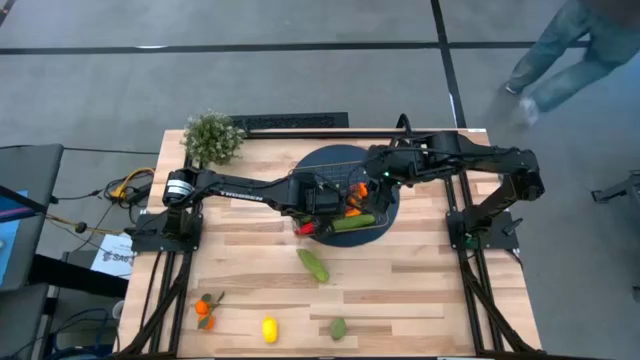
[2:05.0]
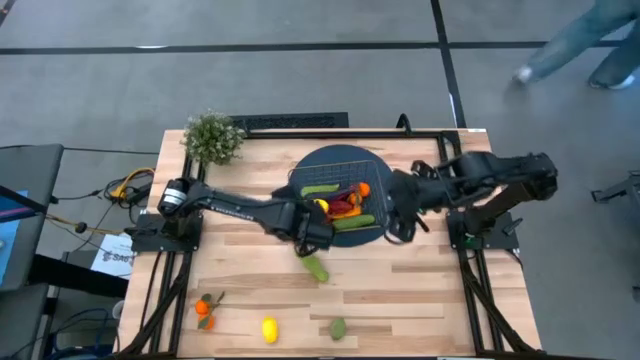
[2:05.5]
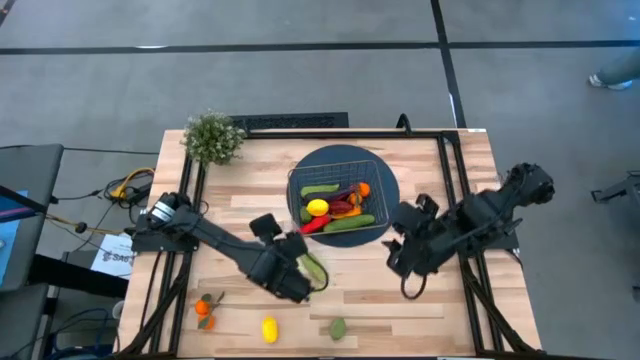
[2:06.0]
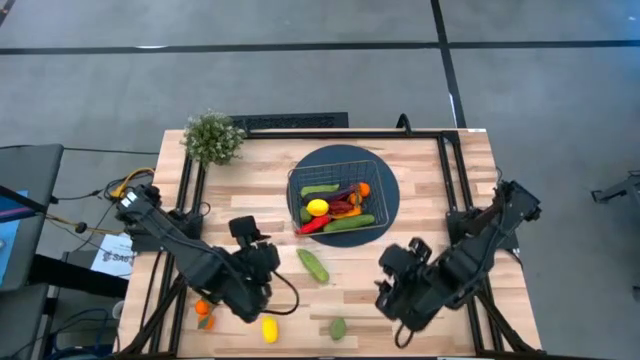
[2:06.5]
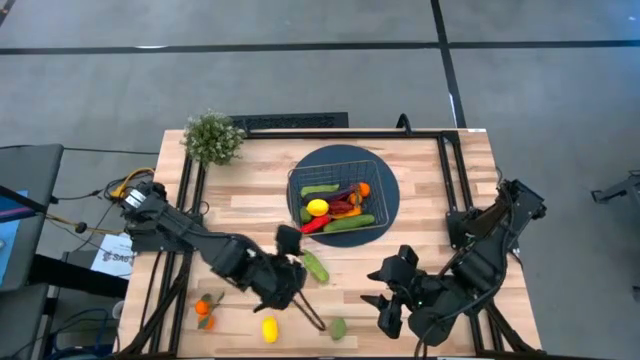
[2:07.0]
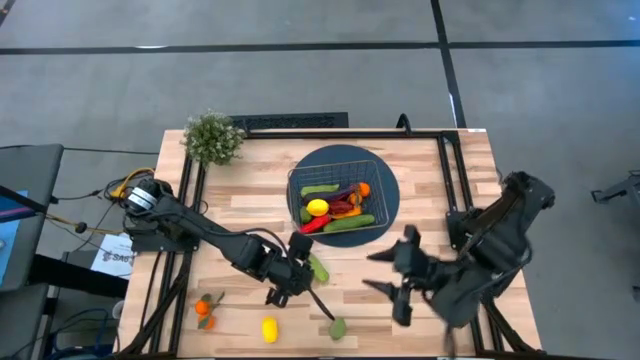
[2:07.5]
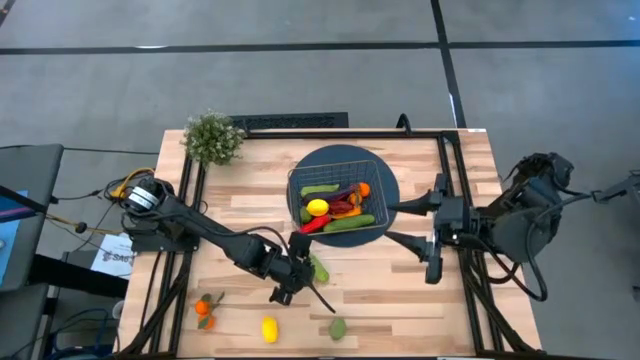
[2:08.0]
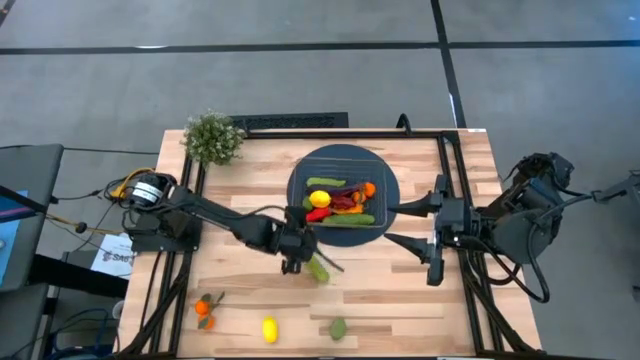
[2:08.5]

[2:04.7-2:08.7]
Task: Build produce basket
Adjust the wire basket

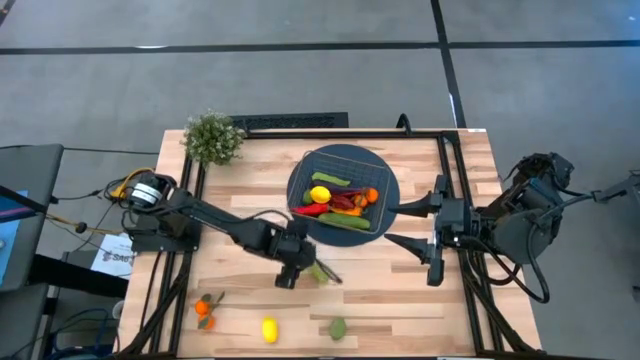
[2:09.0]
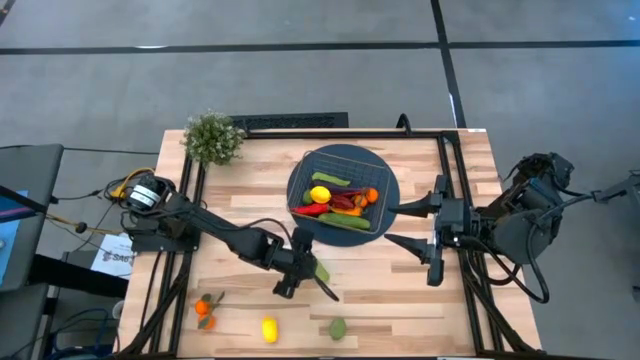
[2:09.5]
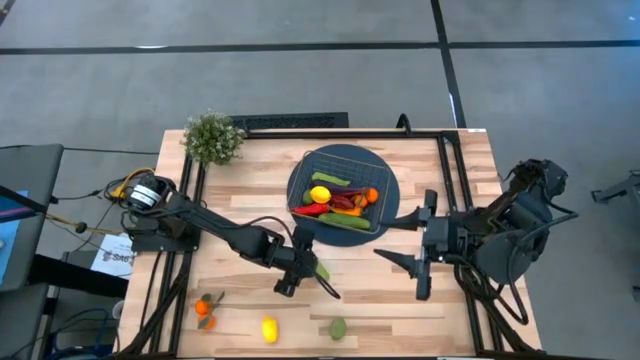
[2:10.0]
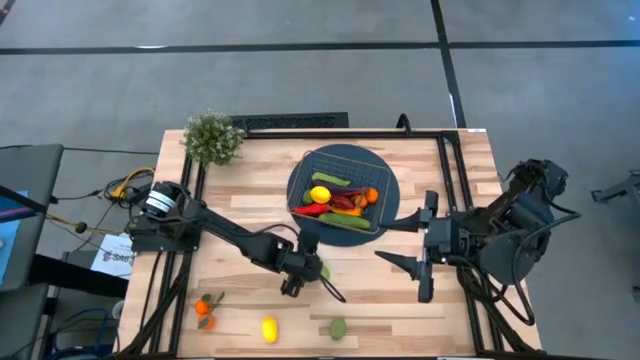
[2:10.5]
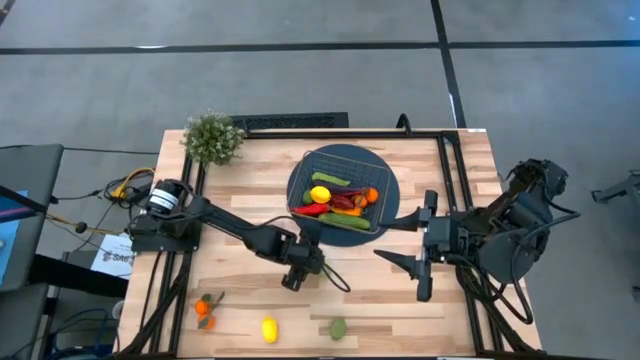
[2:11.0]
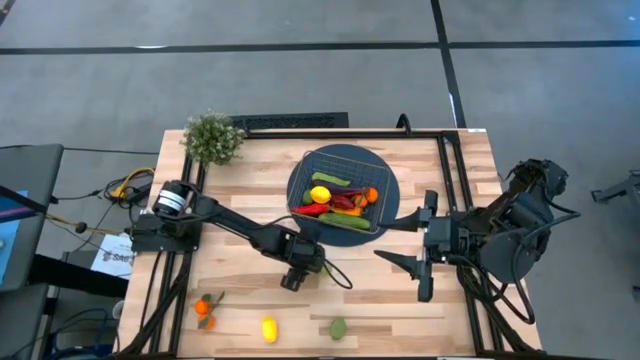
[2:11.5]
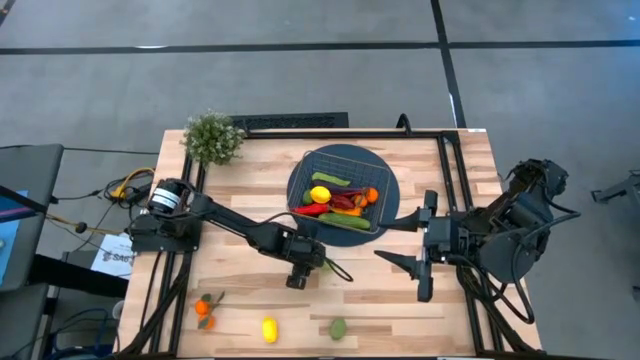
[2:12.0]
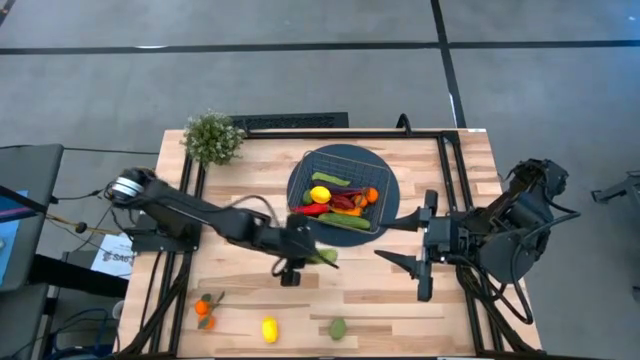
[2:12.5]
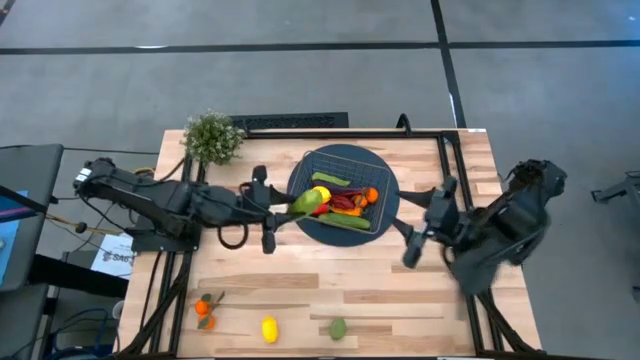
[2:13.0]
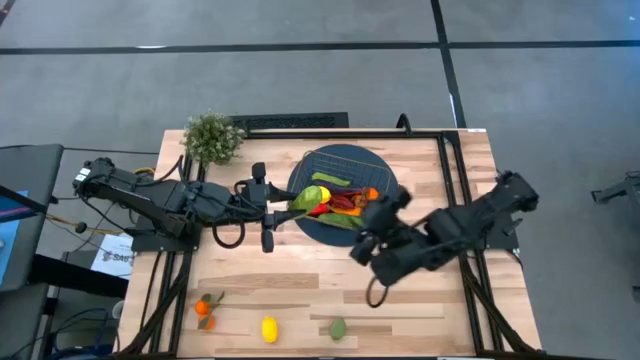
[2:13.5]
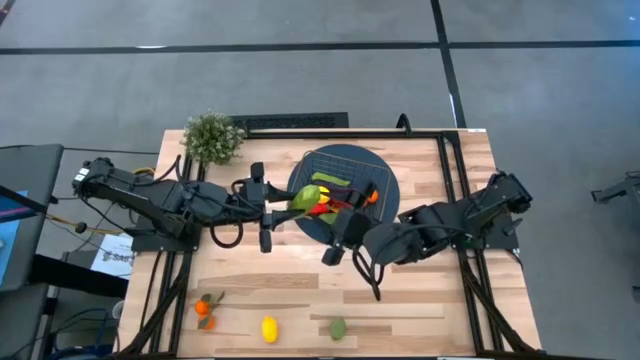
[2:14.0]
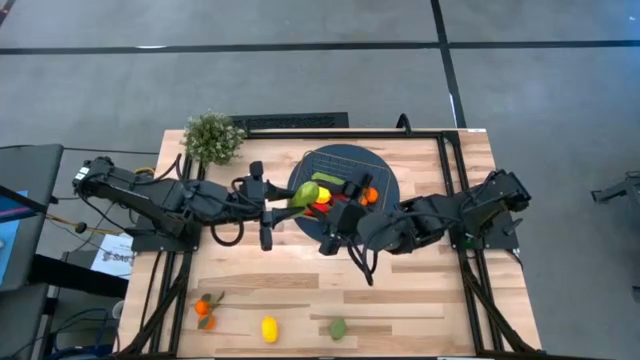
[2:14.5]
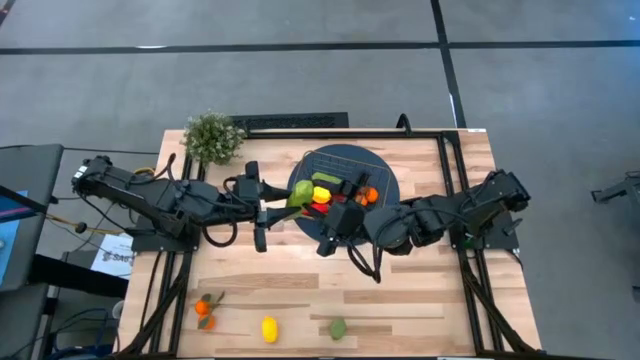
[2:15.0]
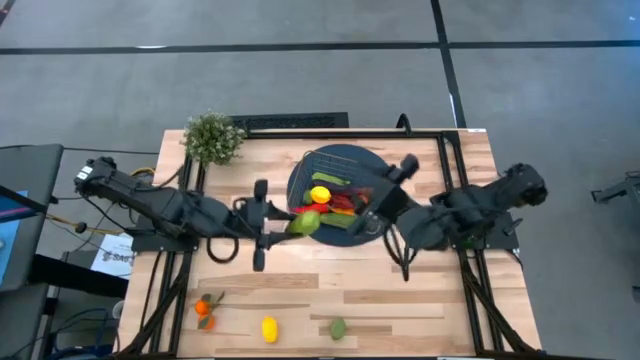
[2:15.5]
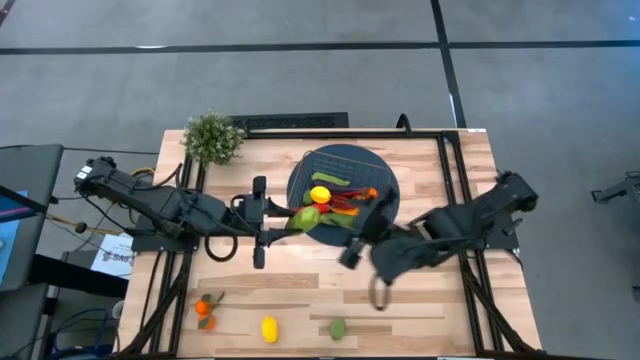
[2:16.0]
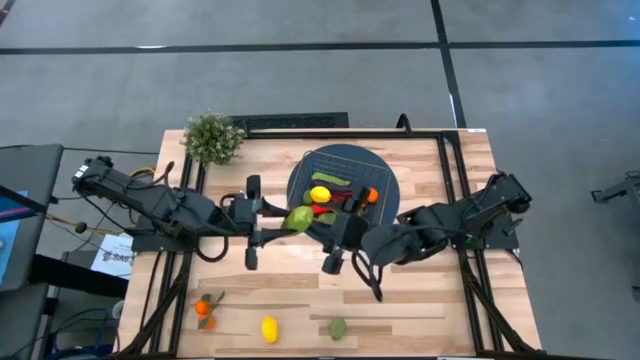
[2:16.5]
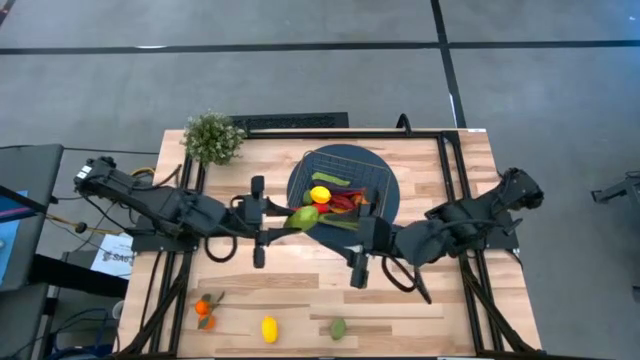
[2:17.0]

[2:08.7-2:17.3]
Put the cucumber into the wire basket

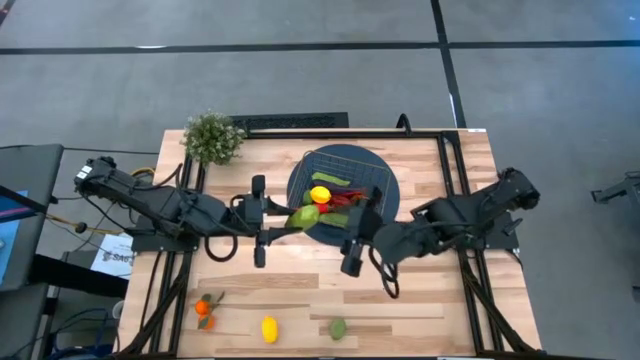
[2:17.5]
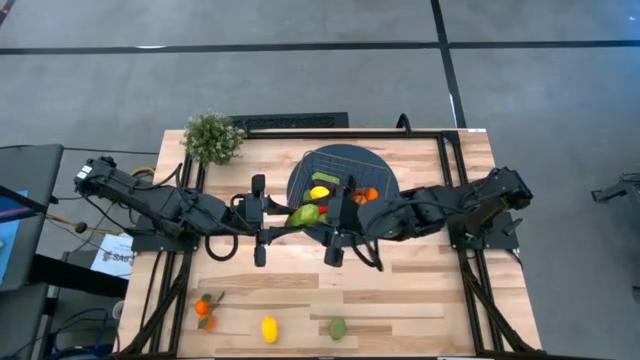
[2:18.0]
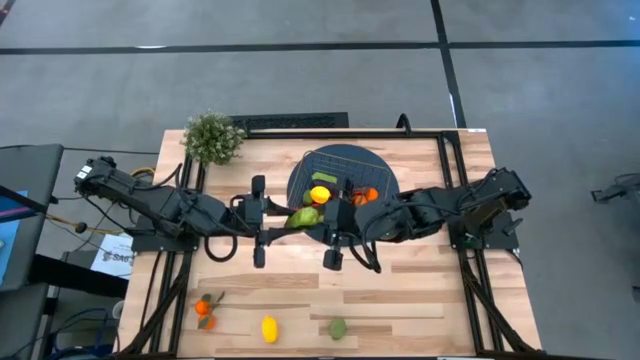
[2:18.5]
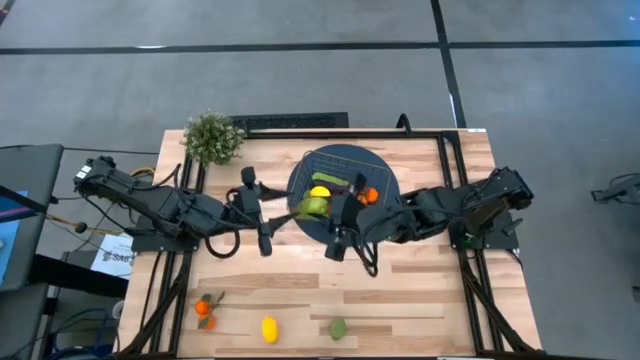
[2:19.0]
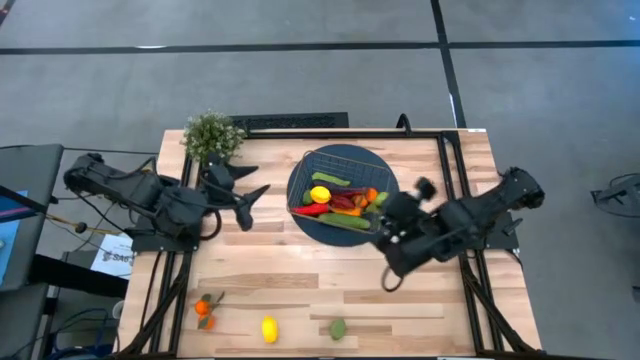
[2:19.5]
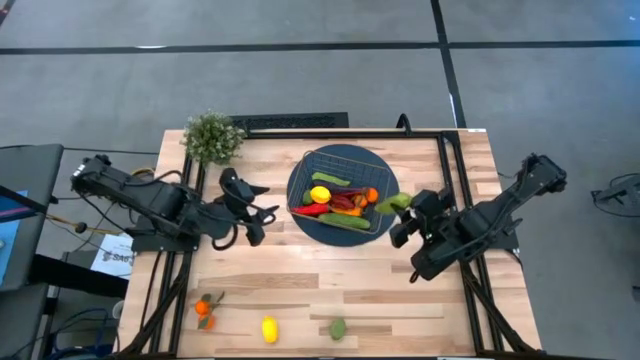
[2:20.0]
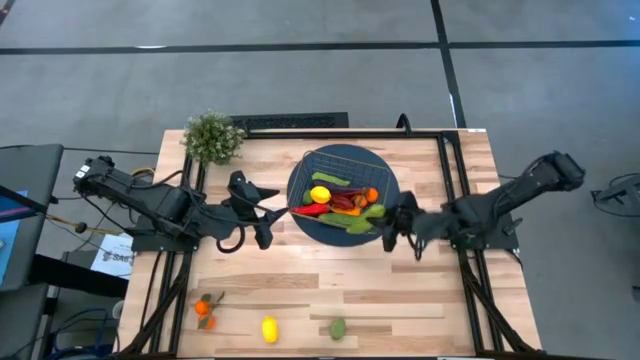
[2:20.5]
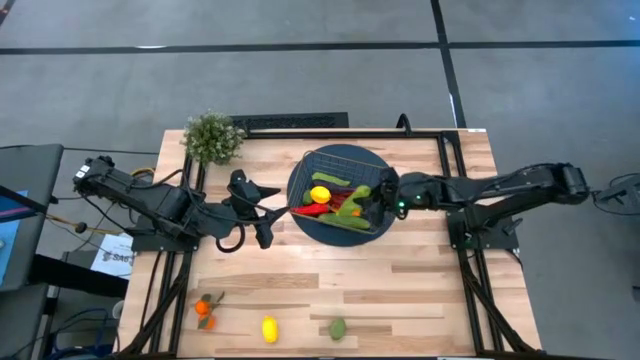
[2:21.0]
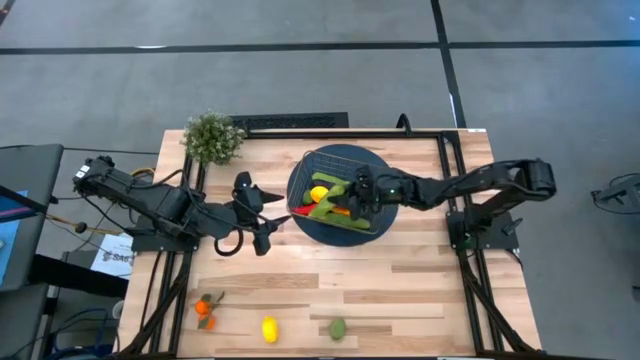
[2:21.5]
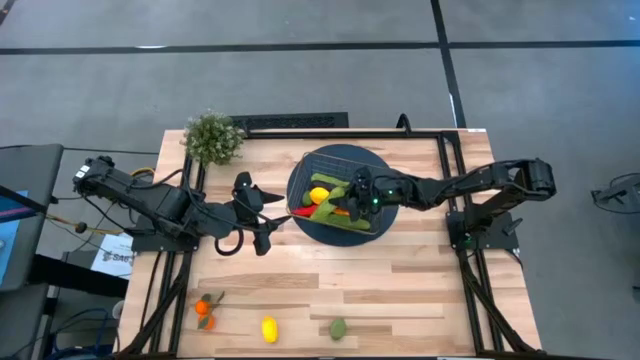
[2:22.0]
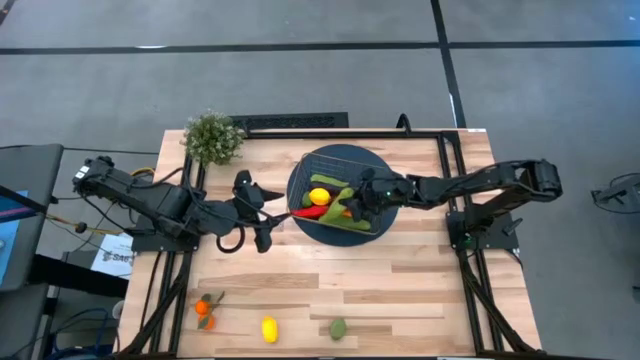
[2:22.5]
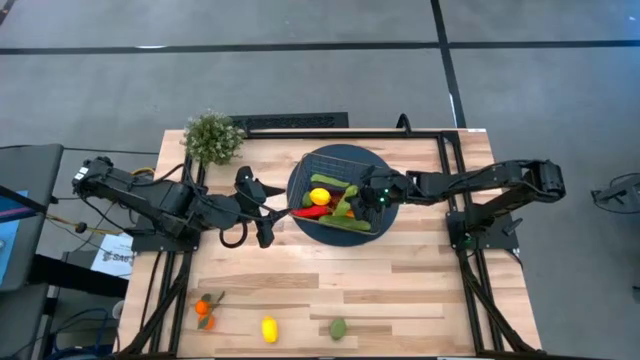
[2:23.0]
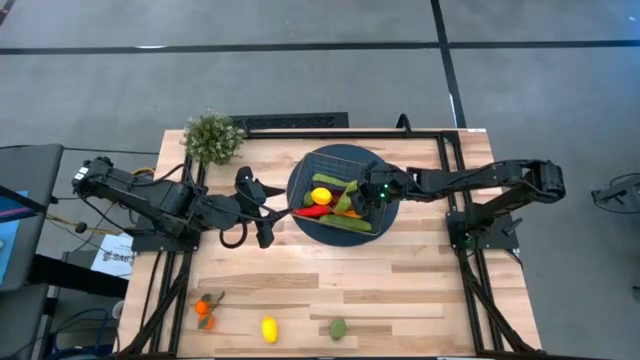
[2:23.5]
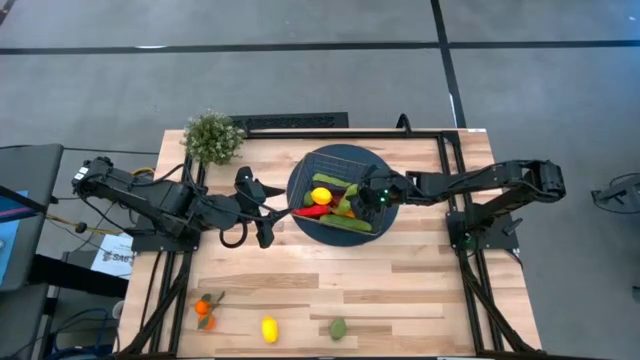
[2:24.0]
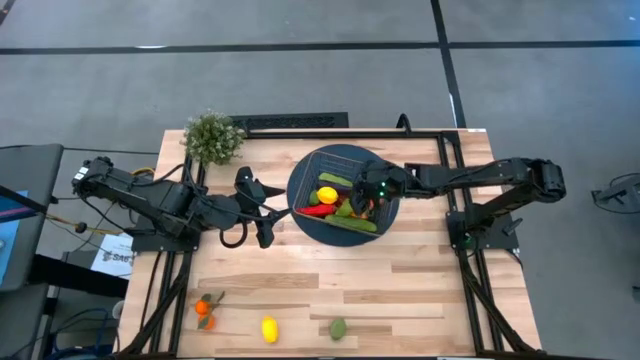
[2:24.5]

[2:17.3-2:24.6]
Put the cucumber into the wire basket

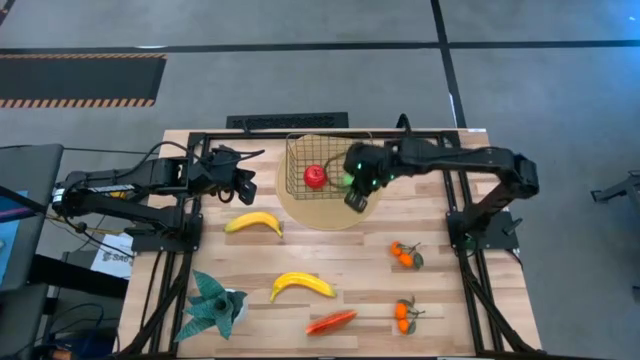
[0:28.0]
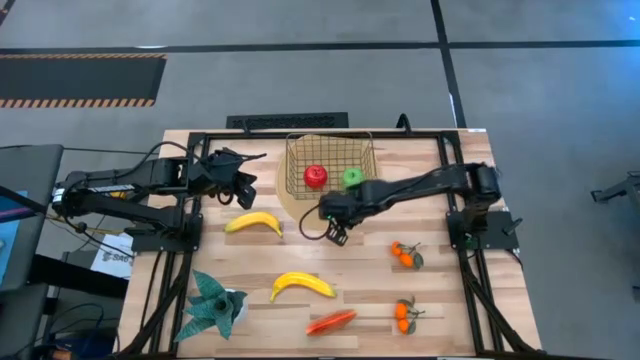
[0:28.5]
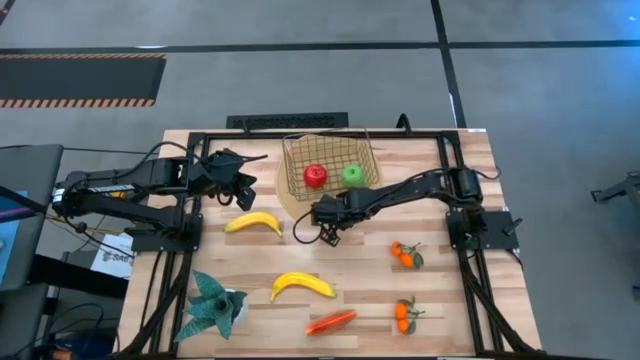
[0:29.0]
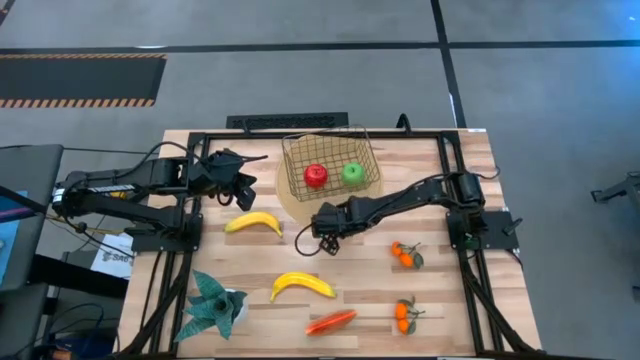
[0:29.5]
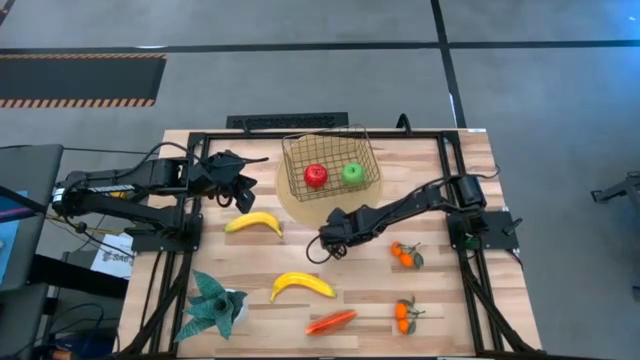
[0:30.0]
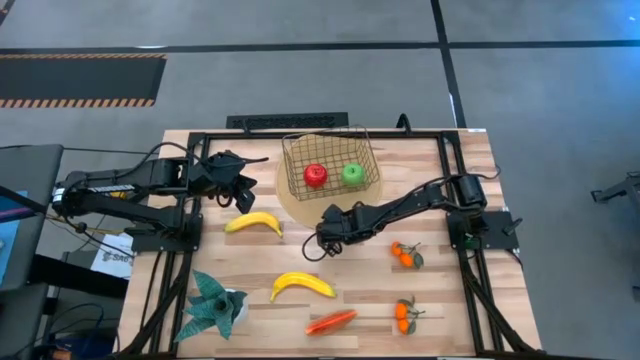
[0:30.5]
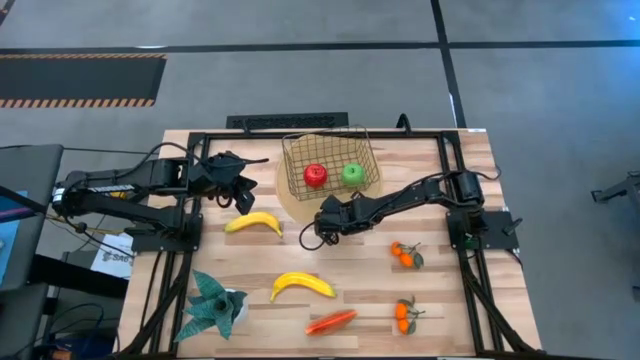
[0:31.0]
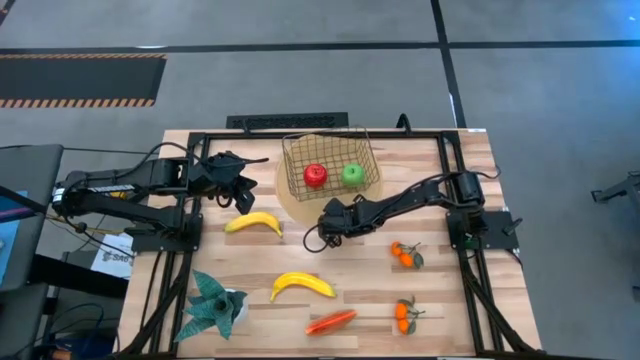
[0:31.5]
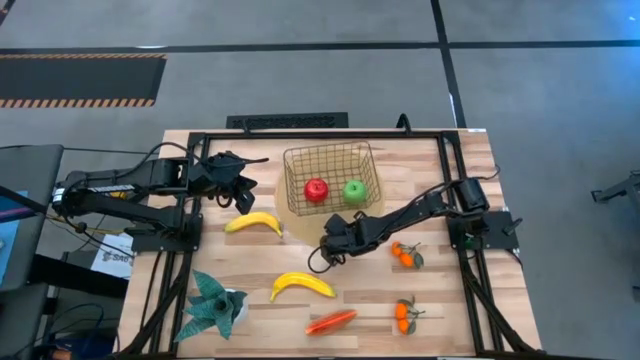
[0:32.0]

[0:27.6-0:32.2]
Task: Build produce basket
Adjust the brown table mat with the basket
